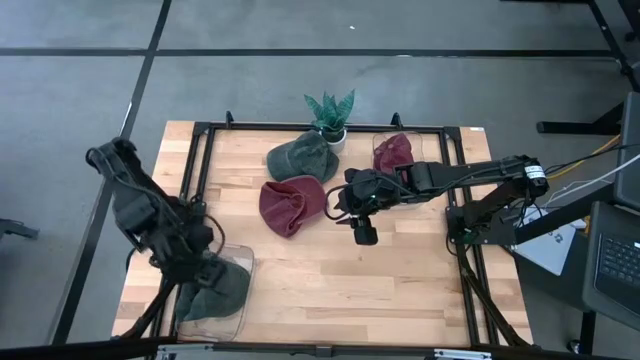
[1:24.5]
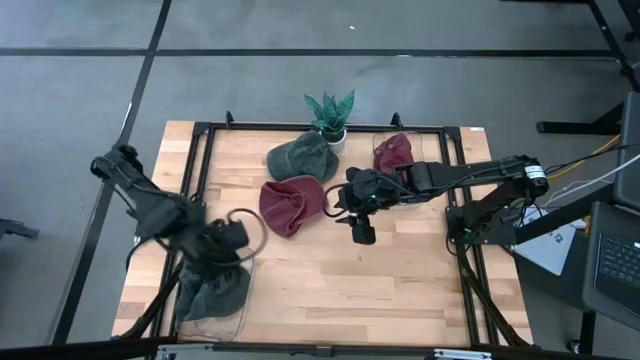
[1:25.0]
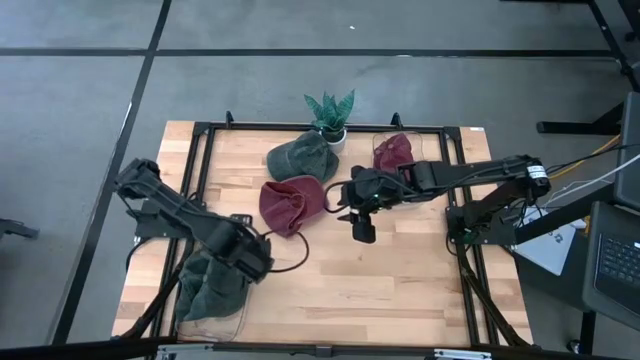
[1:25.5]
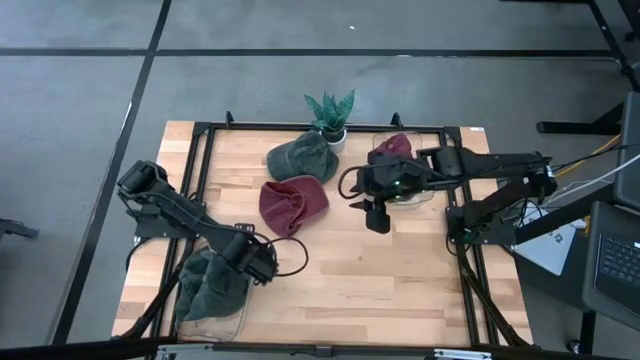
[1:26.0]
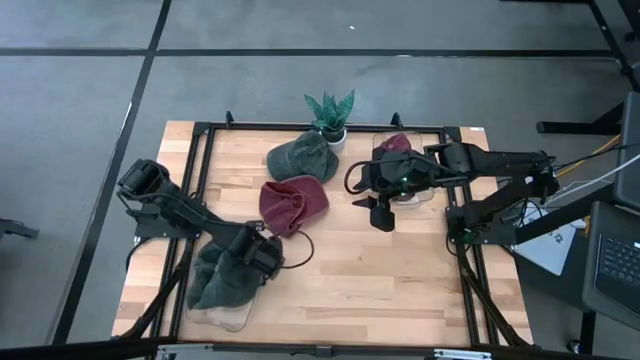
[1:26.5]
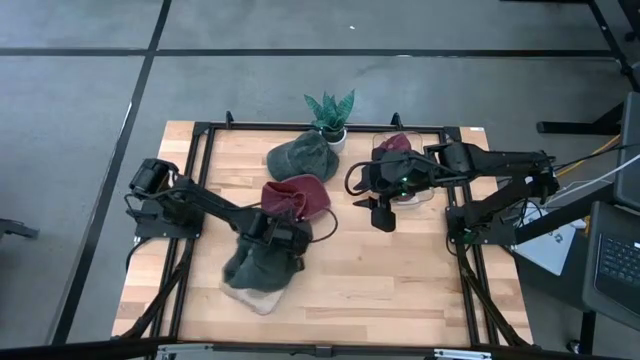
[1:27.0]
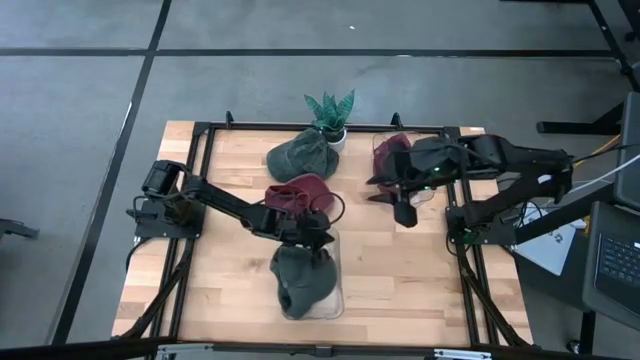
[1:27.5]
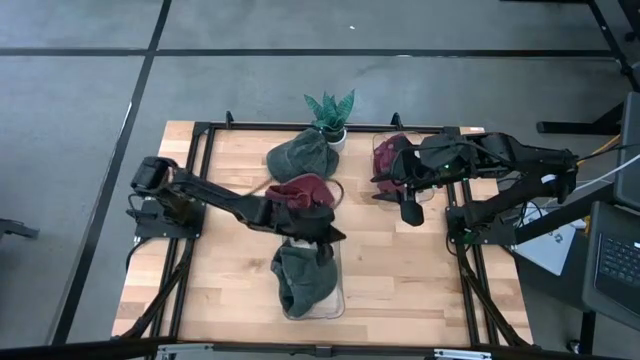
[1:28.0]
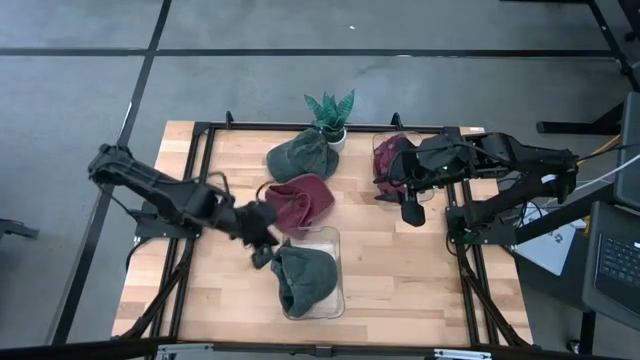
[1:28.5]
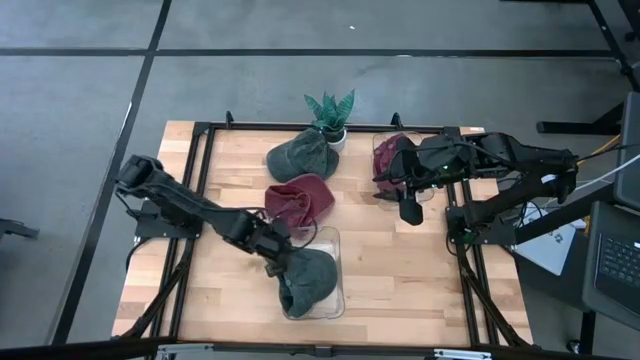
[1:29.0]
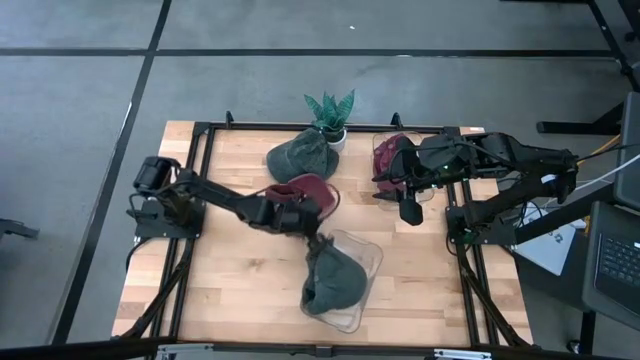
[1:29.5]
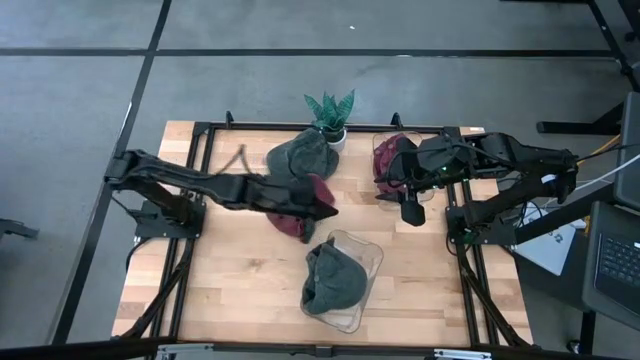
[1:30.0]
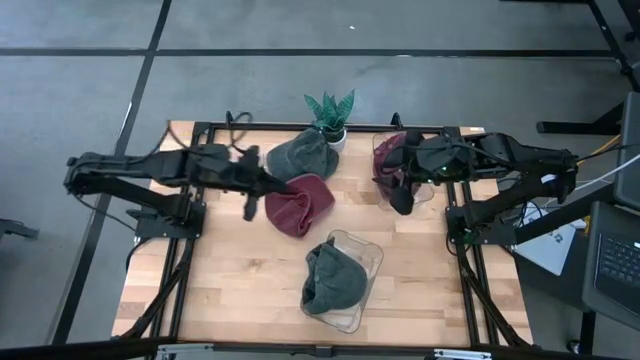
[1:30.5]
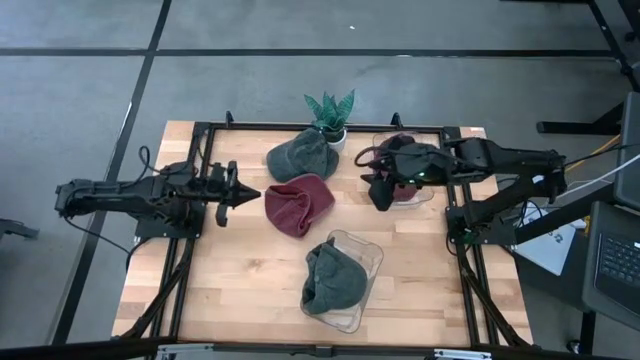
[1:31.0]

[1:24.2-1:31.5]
Task: Pick & Place hat
Move the bottom left transparent bin to the middle of the table

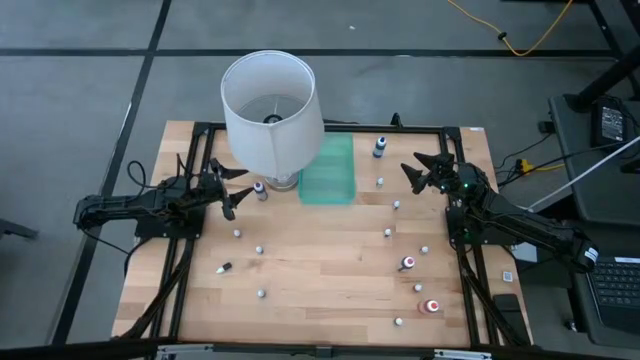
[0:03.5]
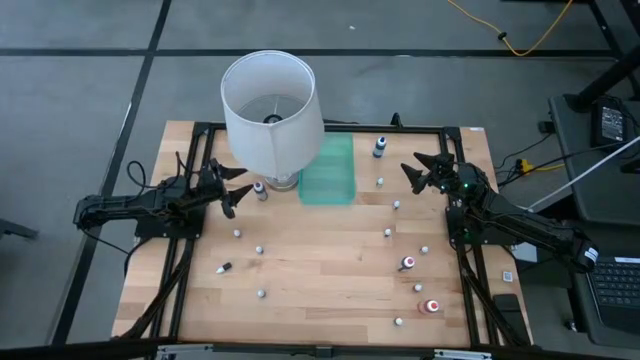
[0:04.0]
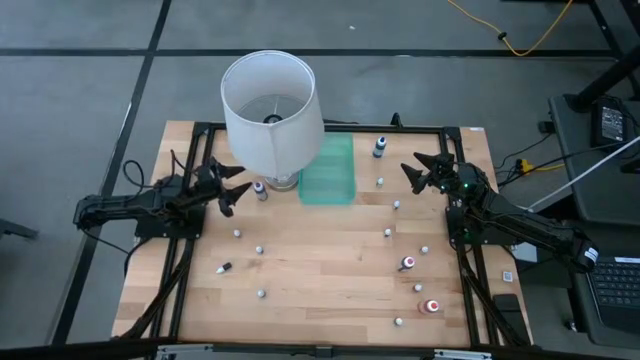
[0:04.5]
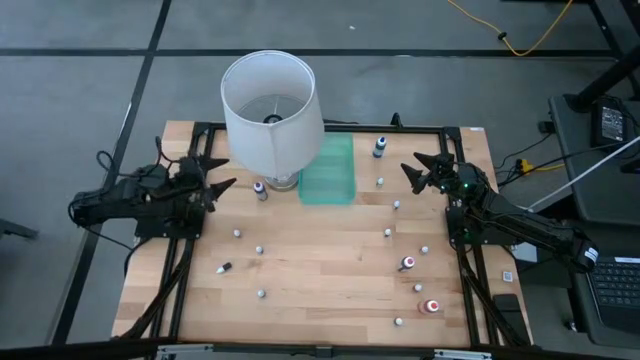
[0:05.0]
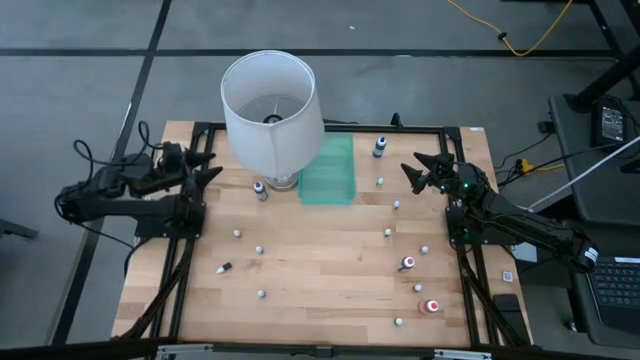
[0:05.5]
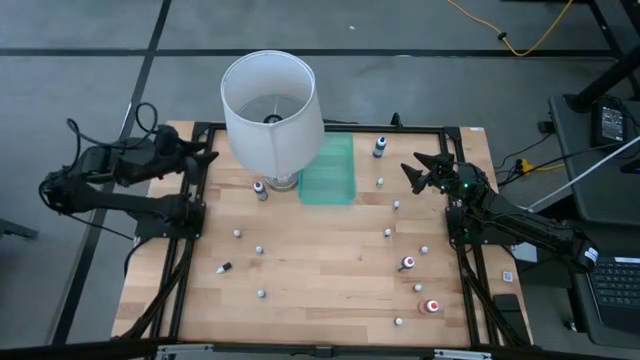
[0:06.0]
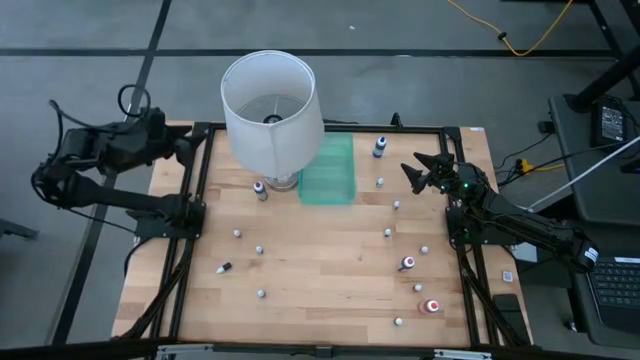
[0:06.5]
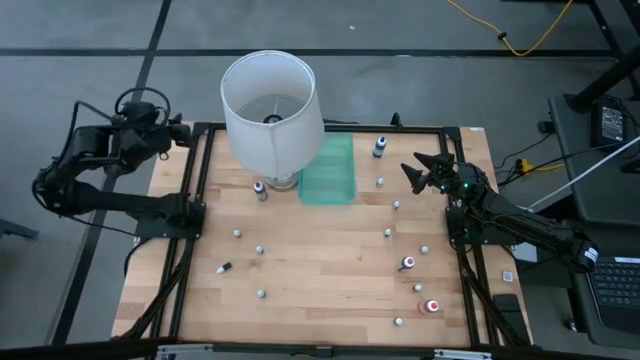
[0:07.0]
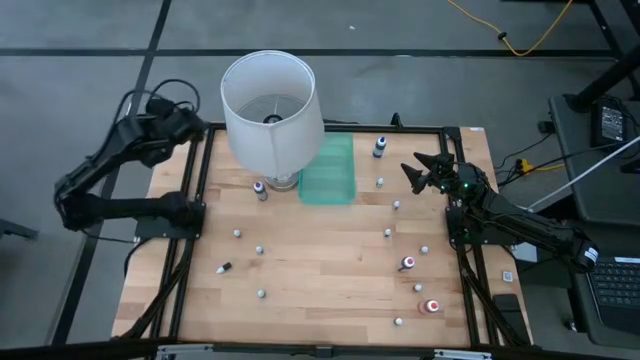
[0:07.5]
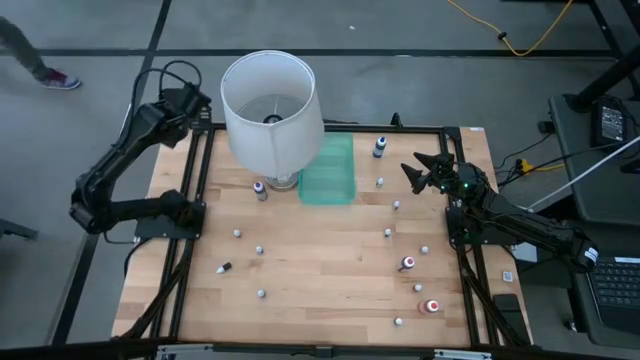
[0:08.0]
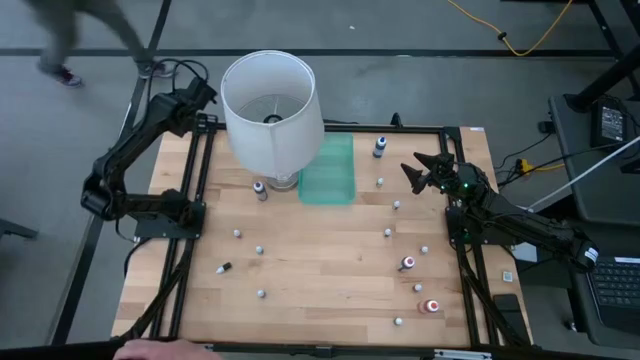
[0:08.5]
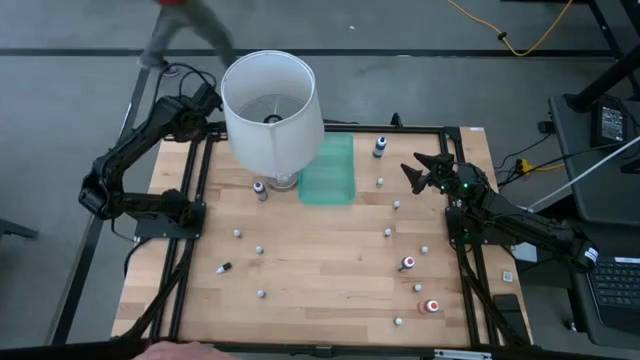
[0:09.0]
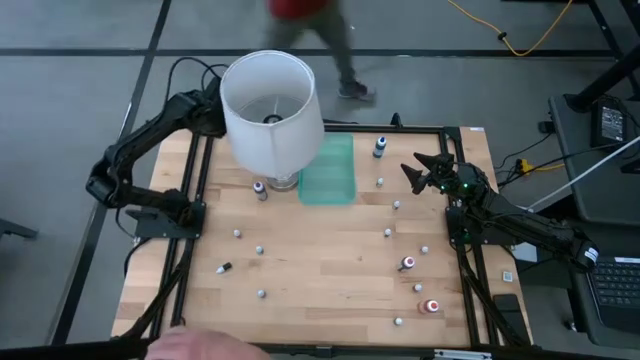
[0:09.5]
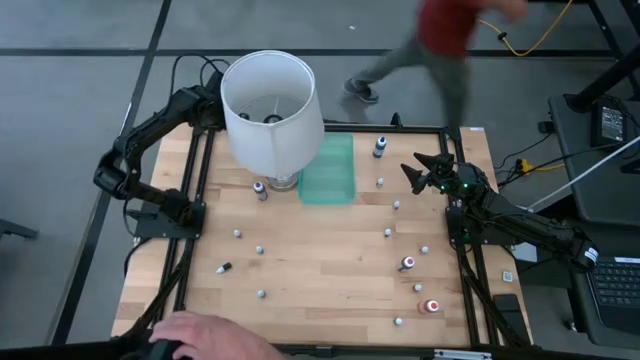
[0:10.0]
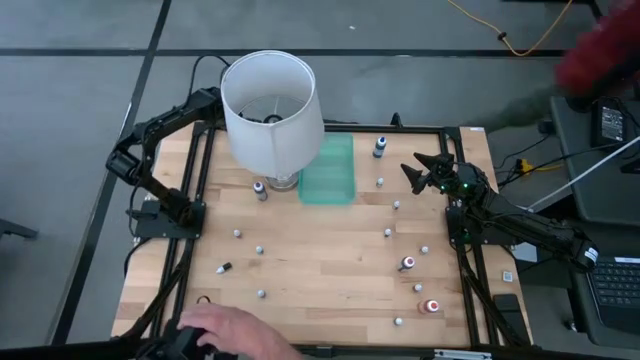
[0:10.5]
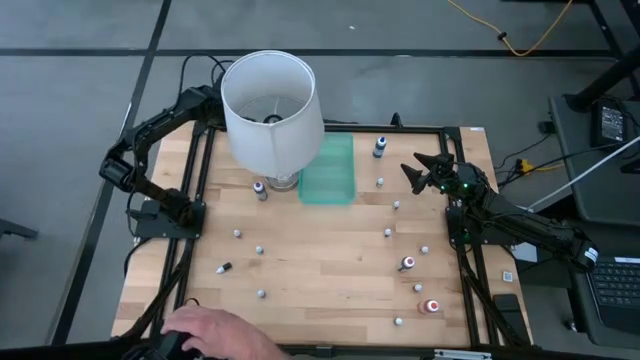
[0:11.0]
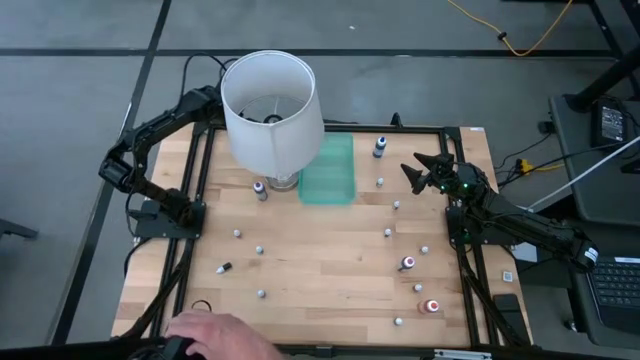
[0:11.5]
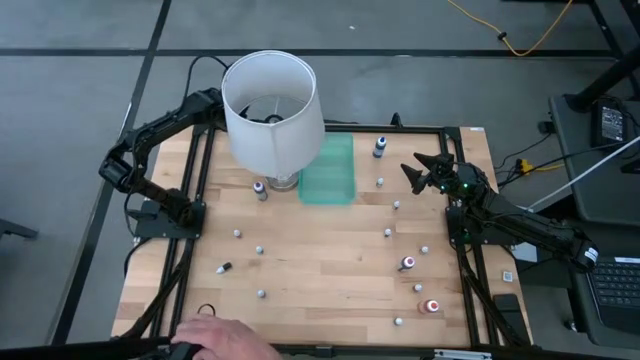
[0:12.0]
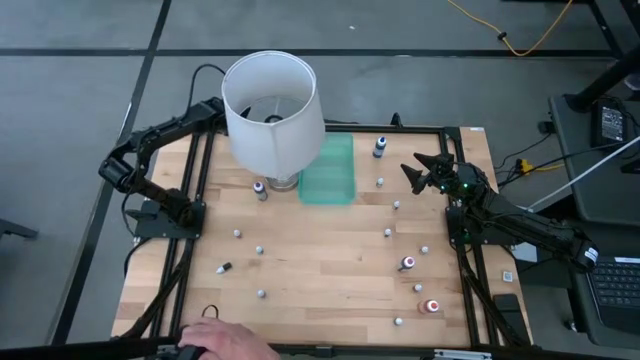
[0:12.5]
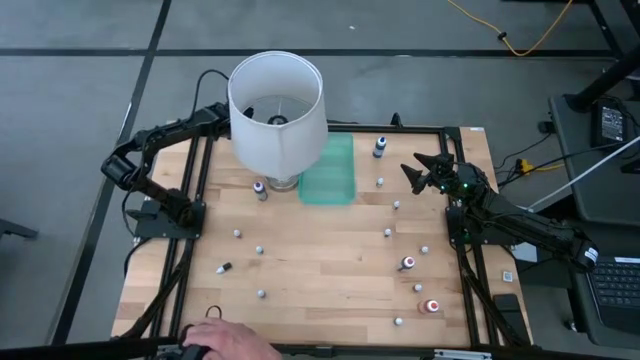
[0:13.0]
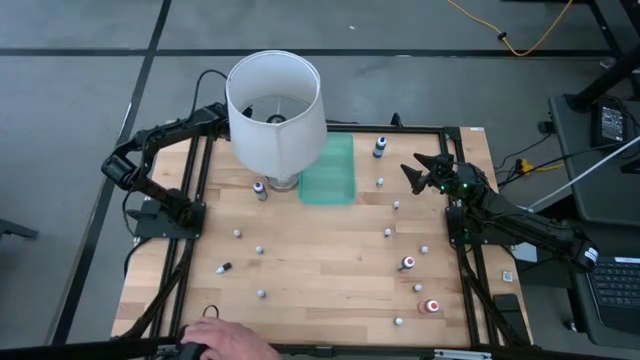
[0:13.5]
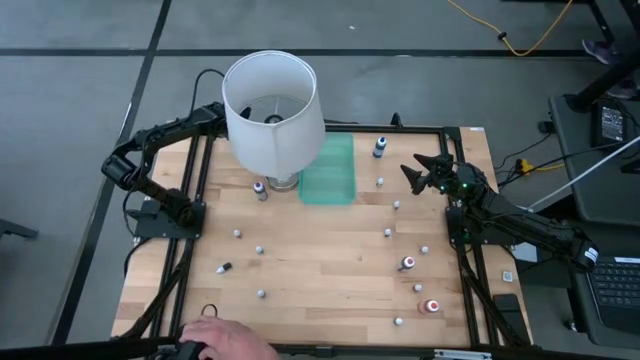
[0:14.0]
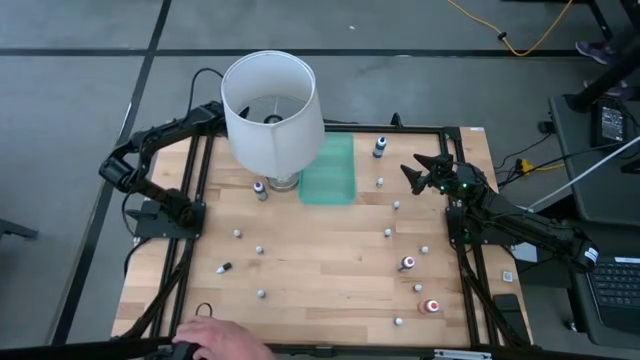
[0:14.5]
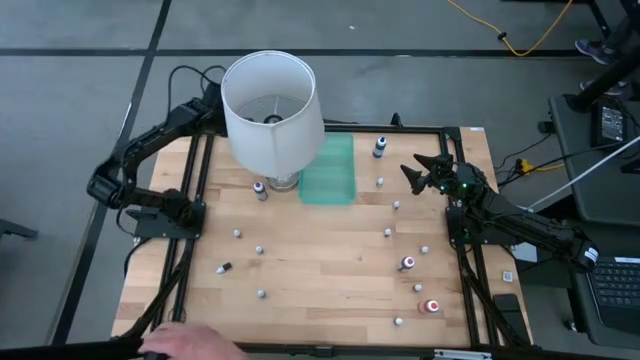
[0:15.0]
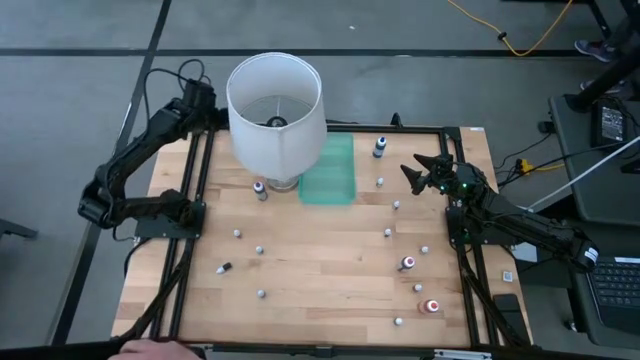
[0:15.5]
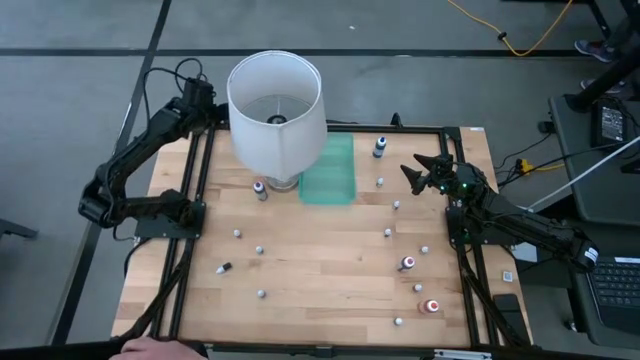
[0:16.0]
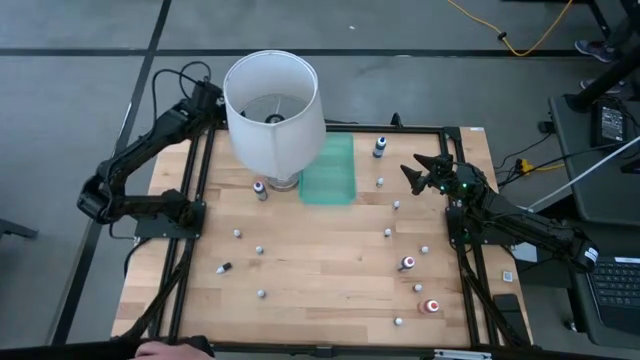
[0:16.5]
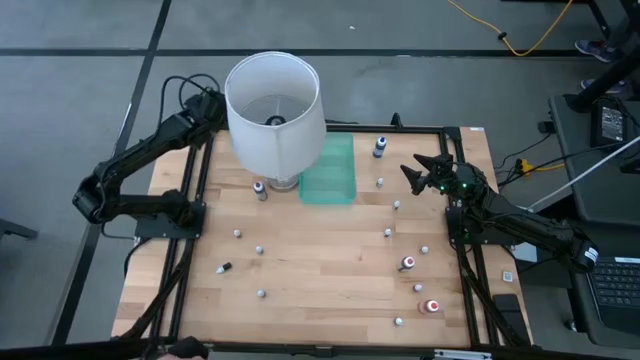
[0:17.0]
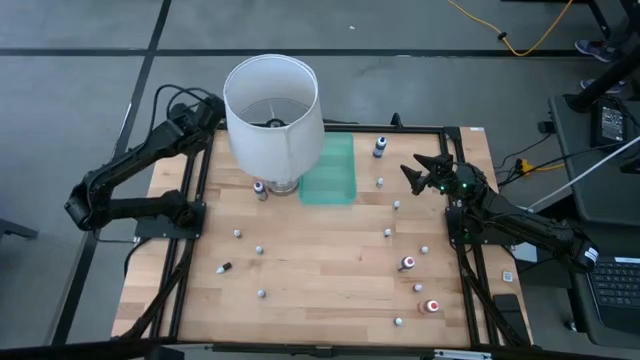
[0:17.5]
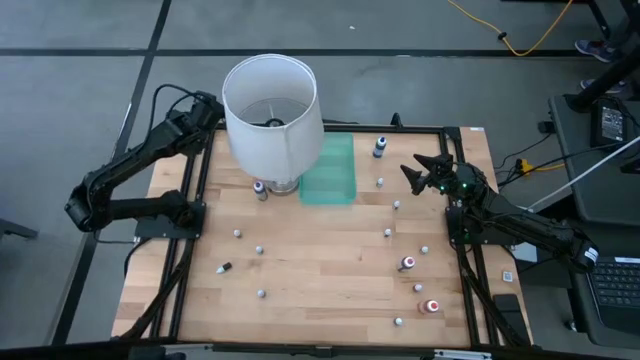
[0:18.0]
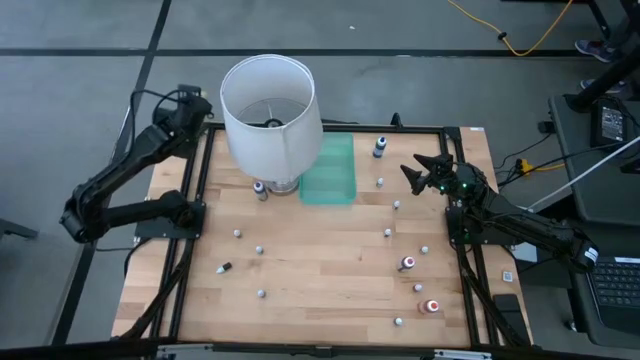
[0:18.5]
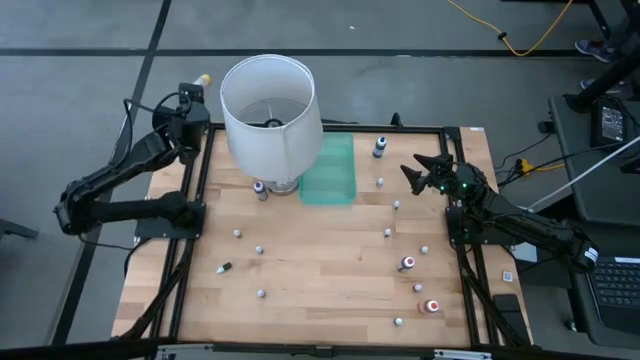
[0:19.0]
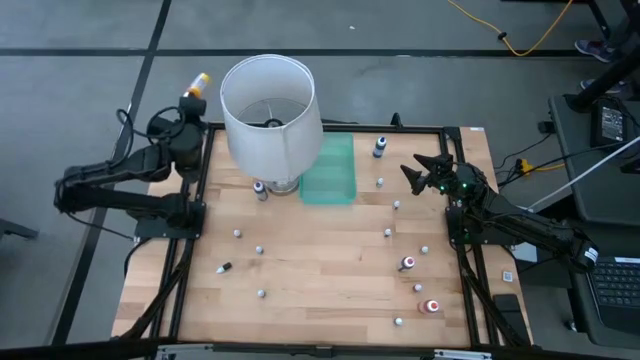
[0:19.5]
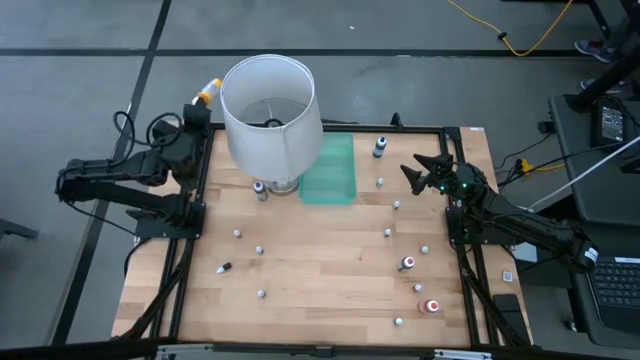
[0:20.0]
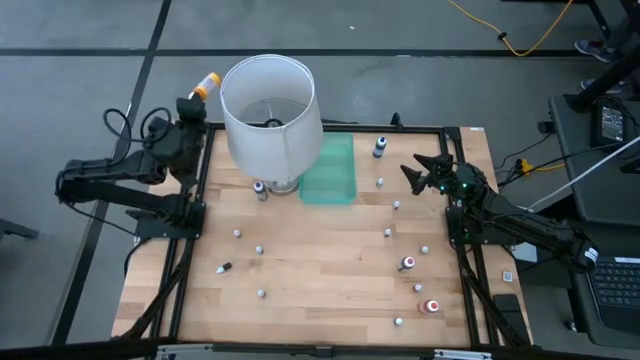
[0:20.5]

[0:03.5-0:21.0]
Task: Pick & Place food coloring
Put the large yellow food coloring bottle into the green bin
